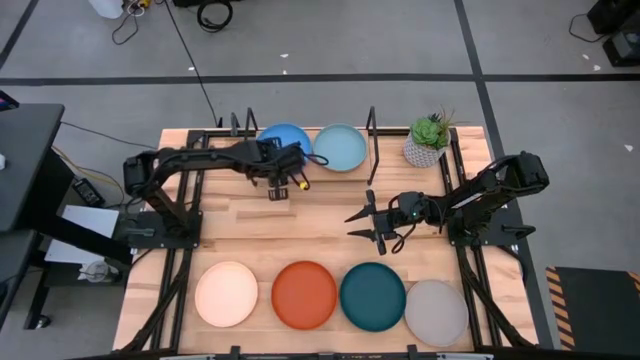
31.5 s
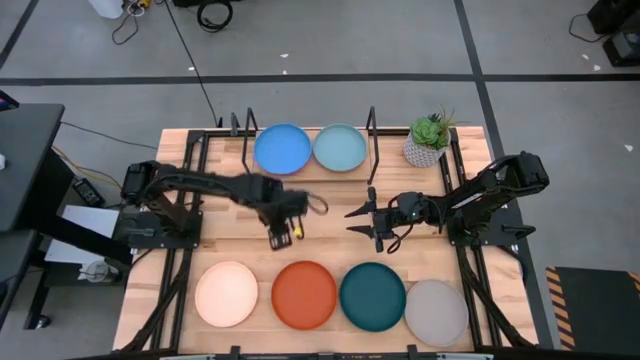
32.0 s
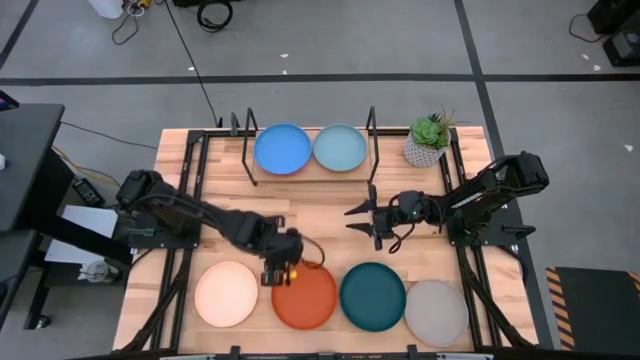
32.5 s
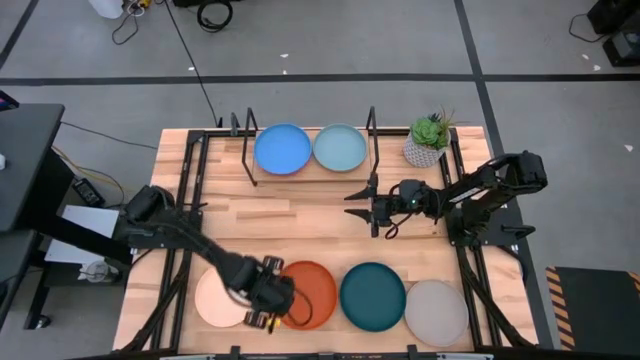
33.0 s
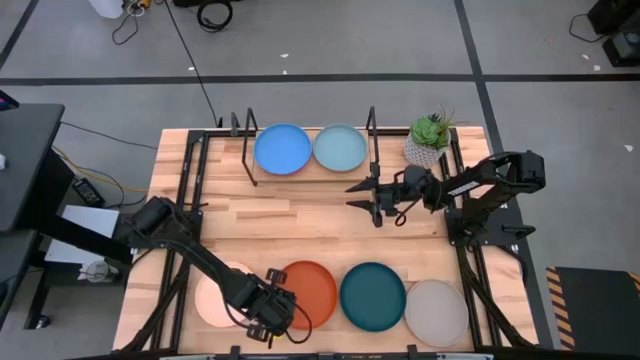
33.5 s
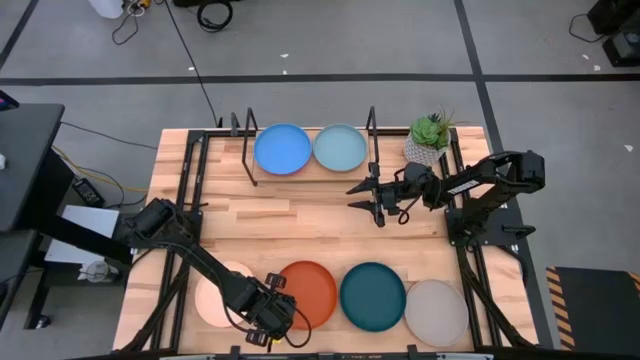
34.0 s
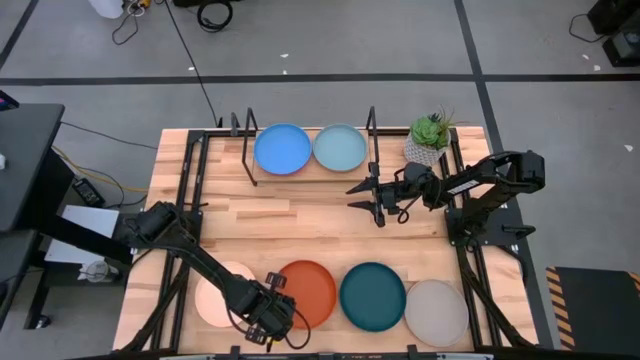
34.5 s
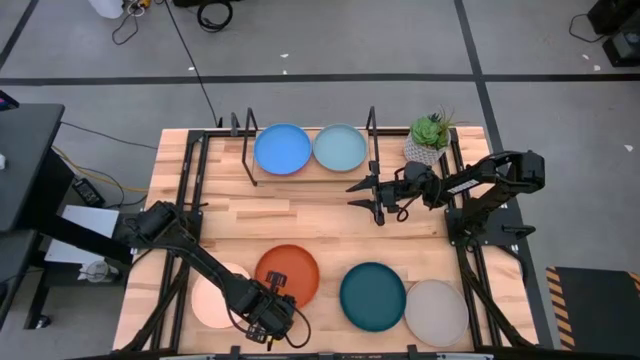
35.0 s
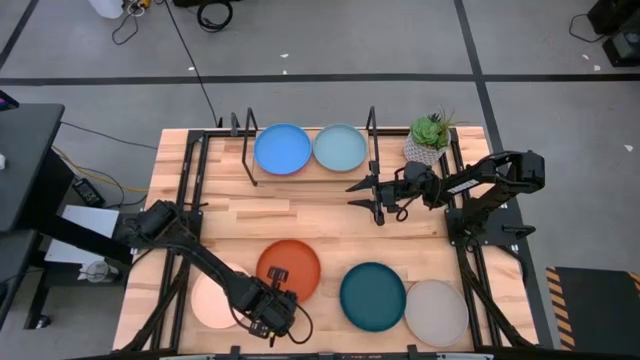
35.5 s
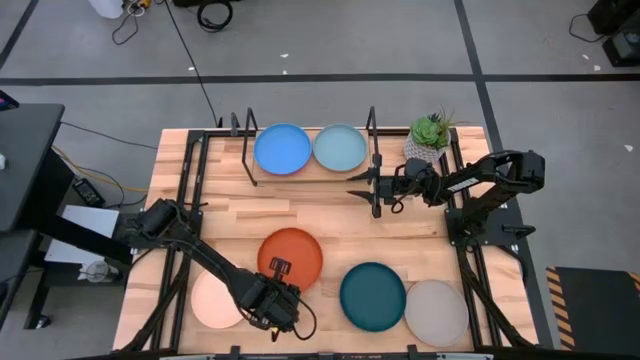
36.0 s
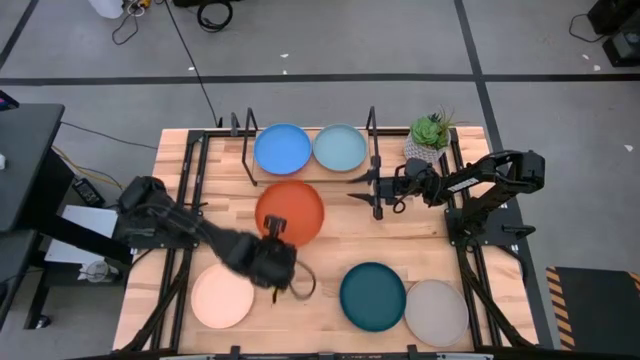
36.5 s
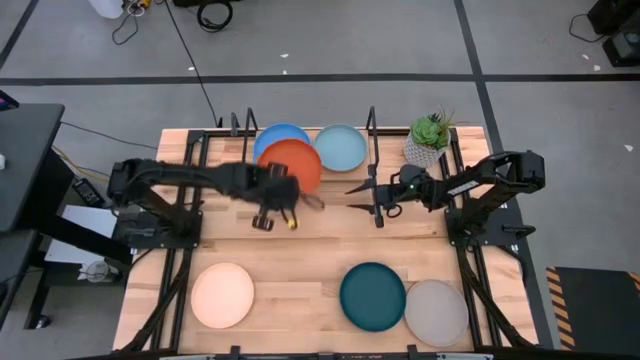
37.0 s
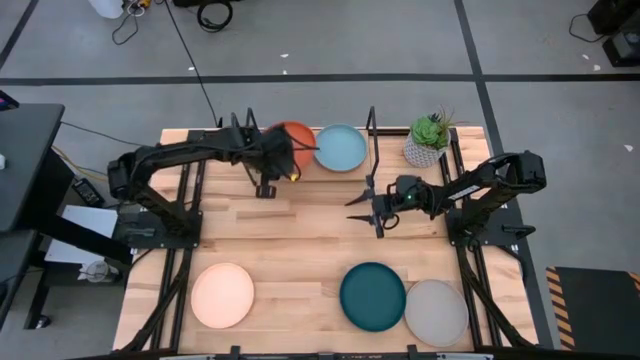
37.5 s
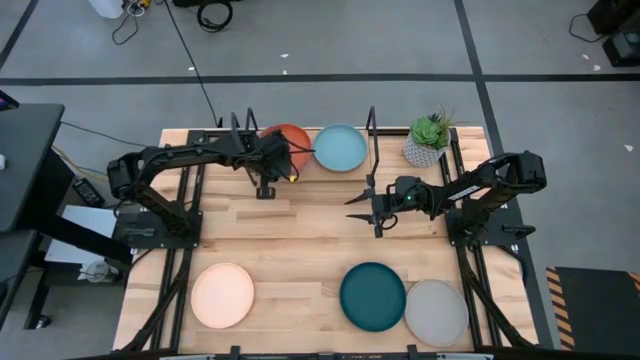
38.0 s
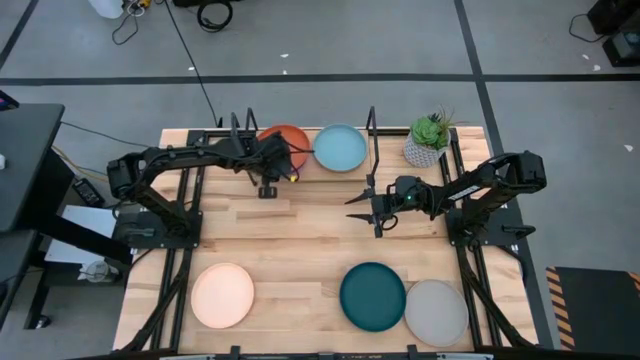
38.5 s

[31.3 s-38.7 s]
Task: Place and stack plates onto a shelf
Stack the orange plate on the top of blue plate on the shelf

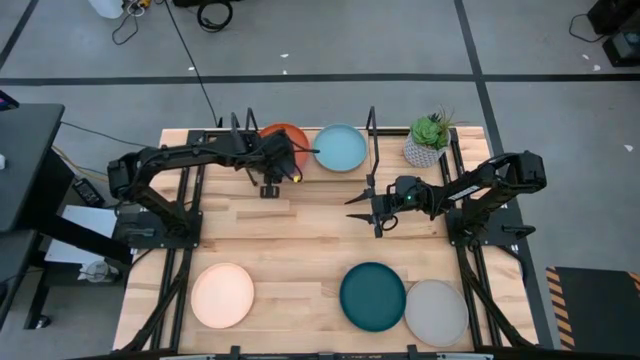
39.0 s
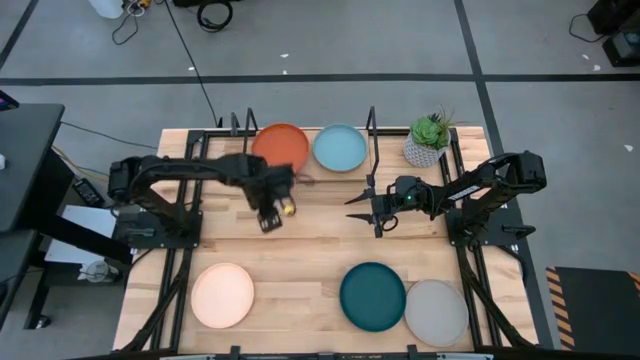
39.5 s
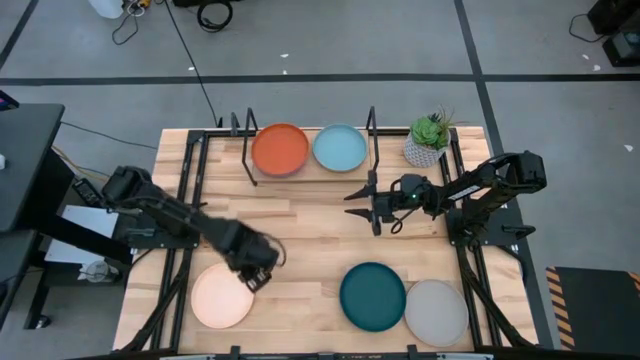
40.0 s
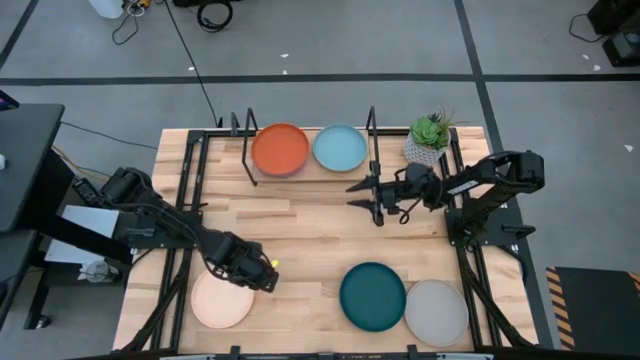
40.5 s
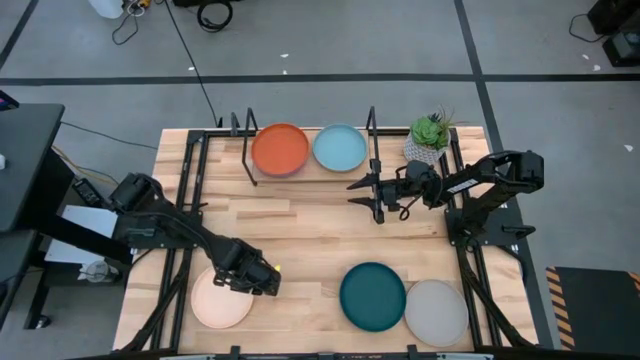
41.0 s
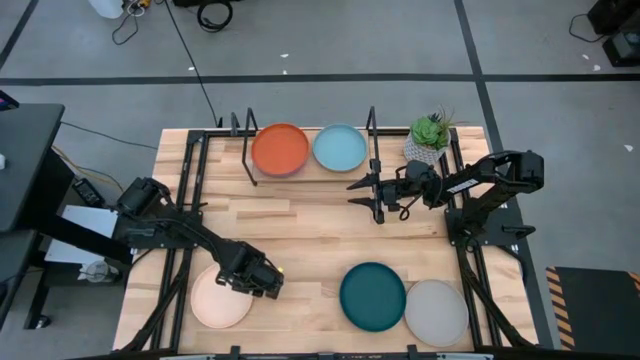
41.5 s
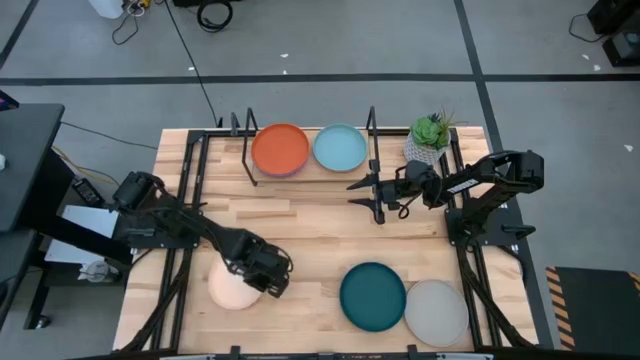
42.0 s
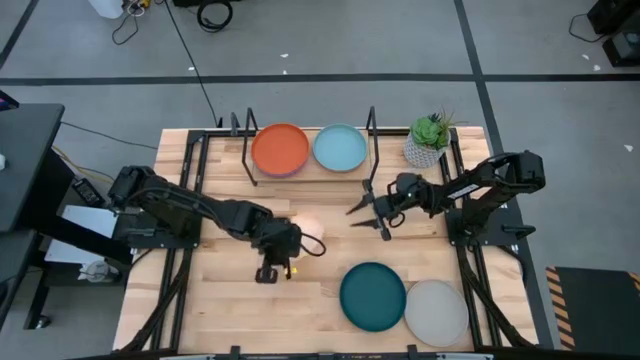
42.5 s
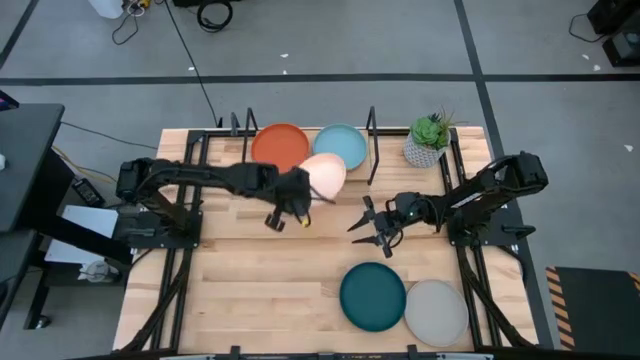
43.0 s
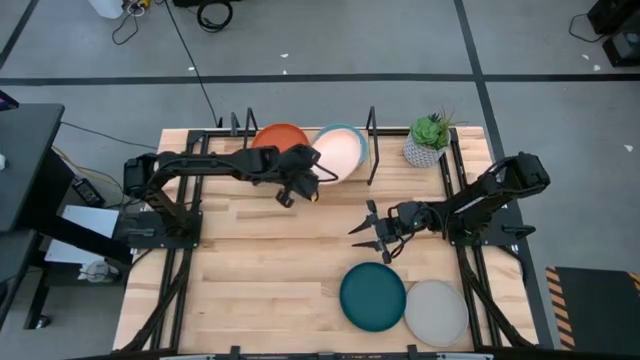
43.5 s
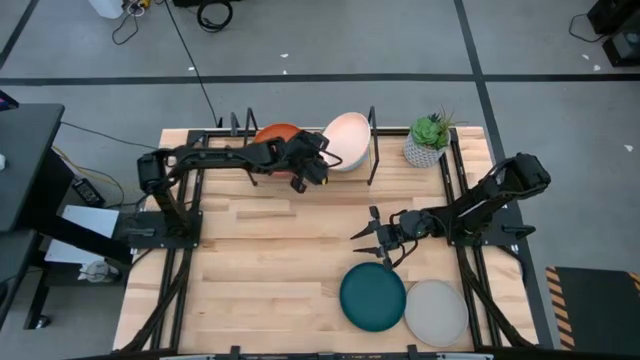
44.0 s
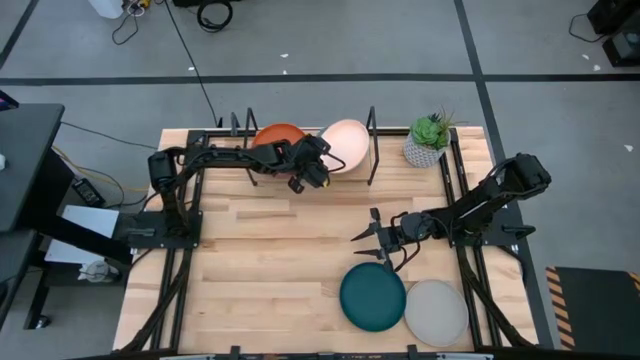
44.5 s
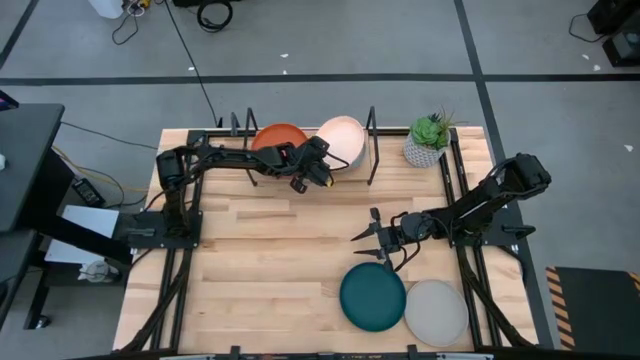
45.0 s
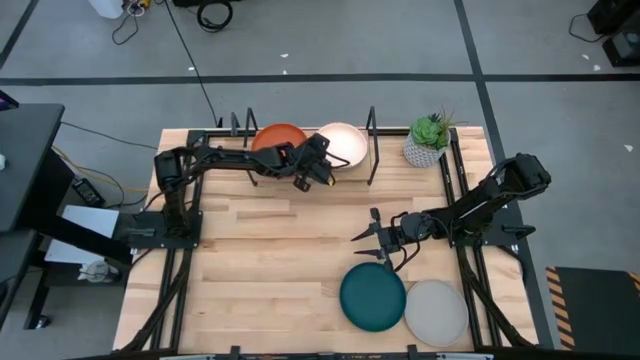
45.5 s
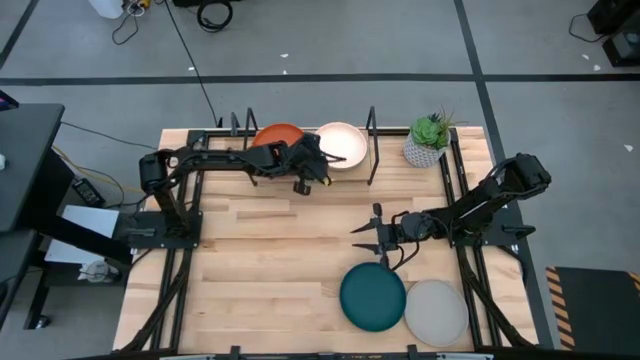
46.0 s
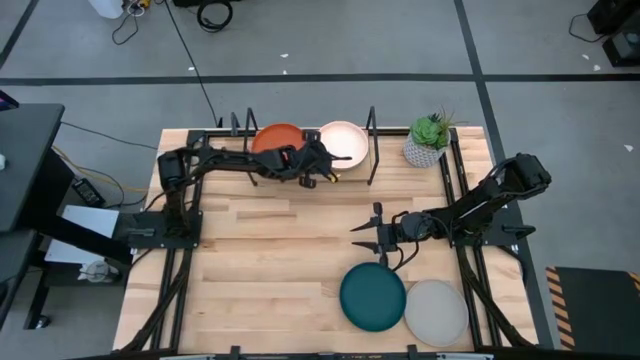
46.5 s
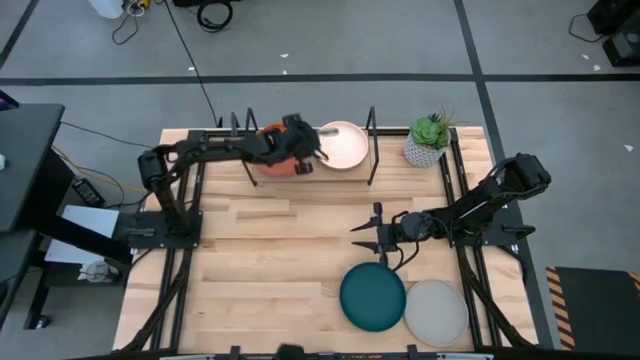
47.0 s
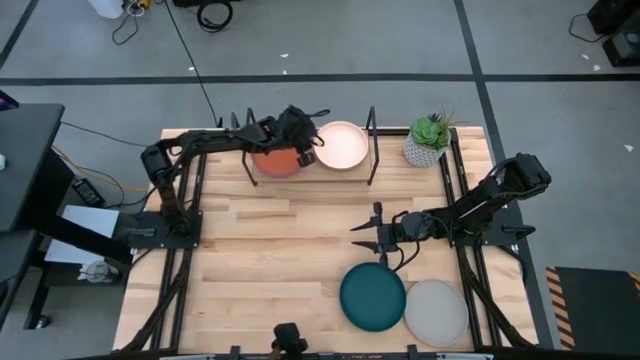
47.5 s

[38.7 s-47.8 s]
Stack the white plate on the top of light blue plate on the shelf

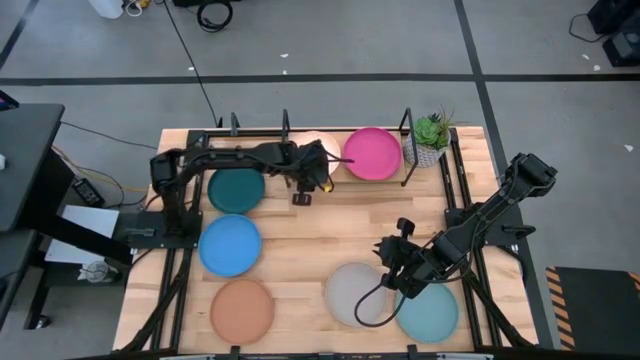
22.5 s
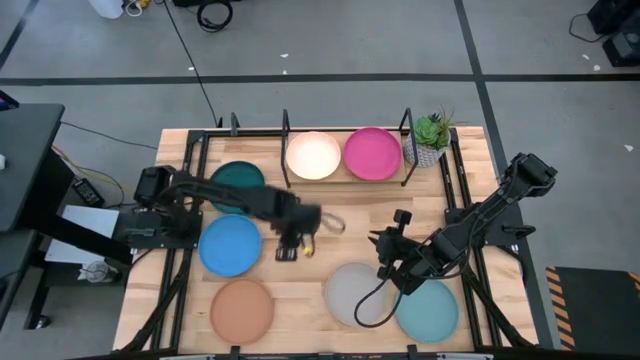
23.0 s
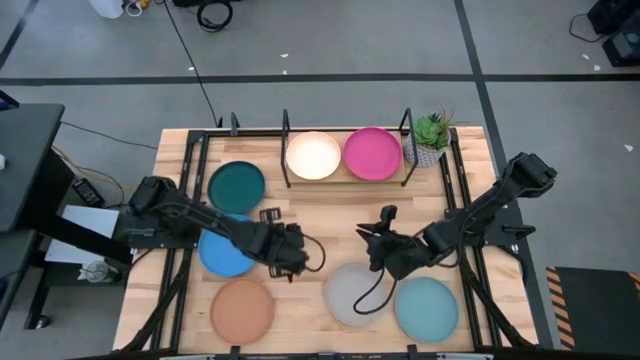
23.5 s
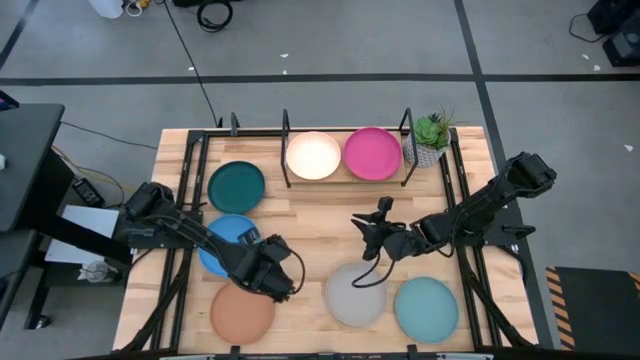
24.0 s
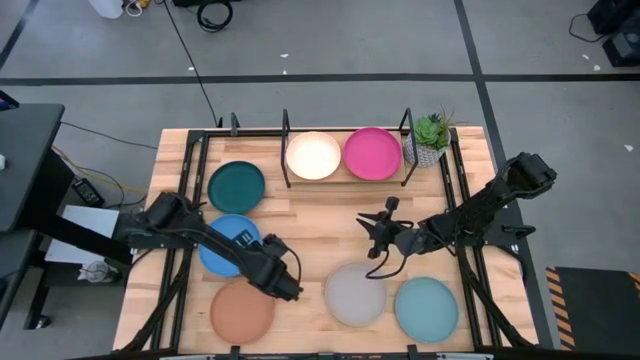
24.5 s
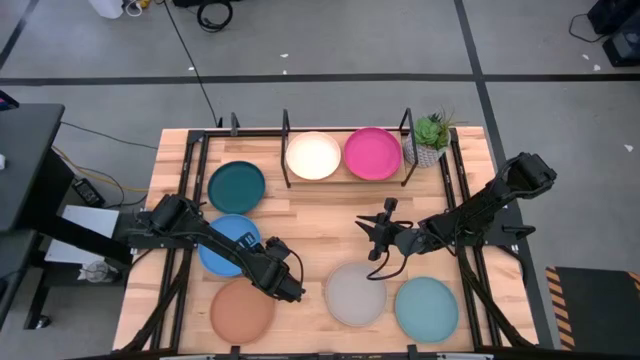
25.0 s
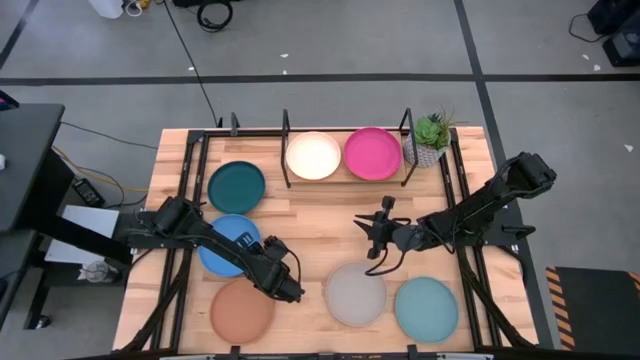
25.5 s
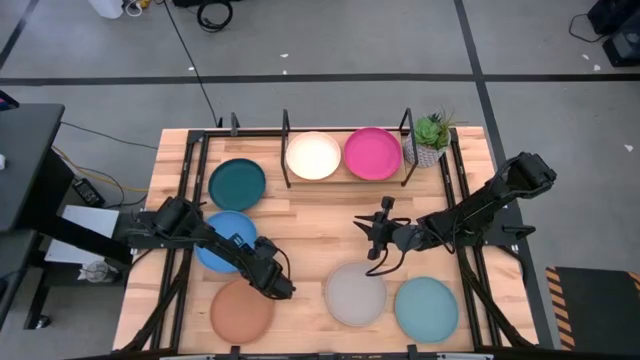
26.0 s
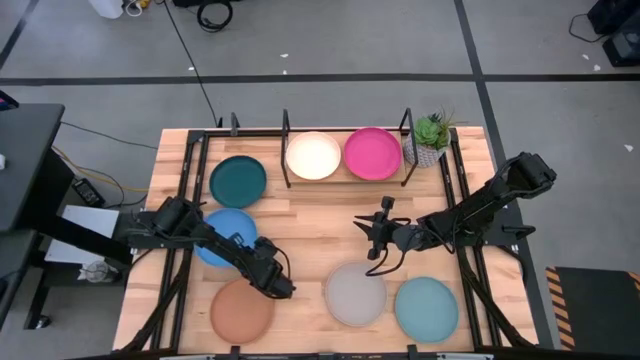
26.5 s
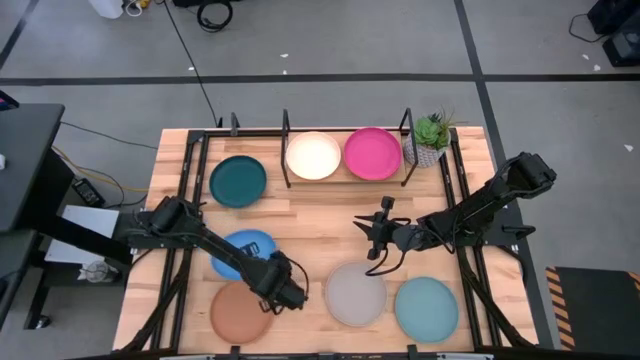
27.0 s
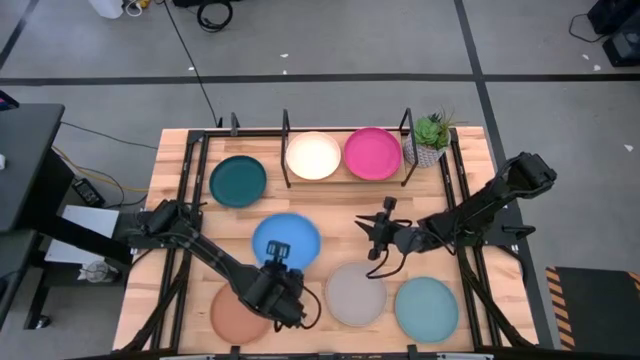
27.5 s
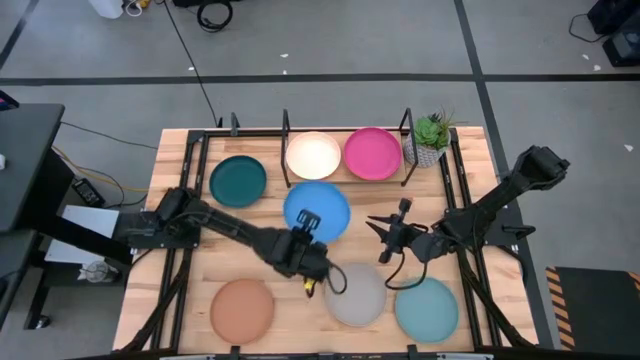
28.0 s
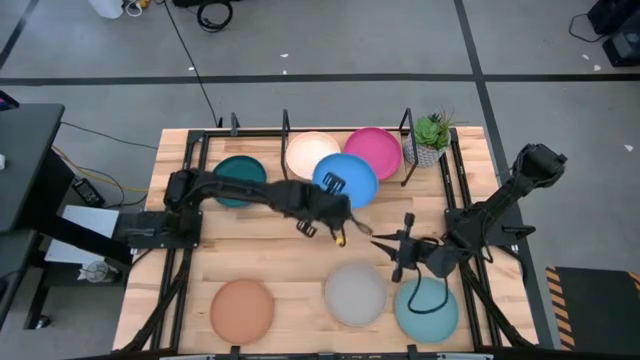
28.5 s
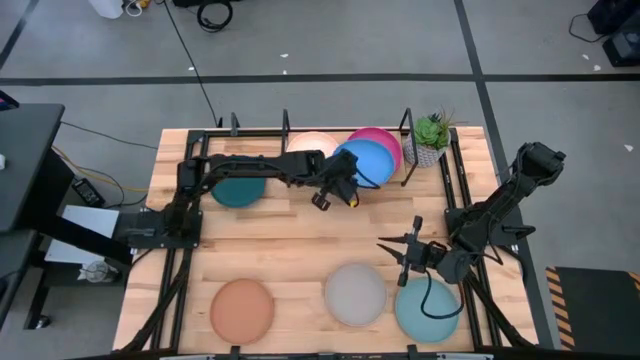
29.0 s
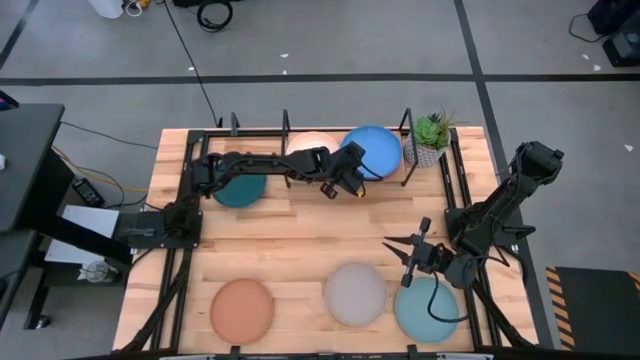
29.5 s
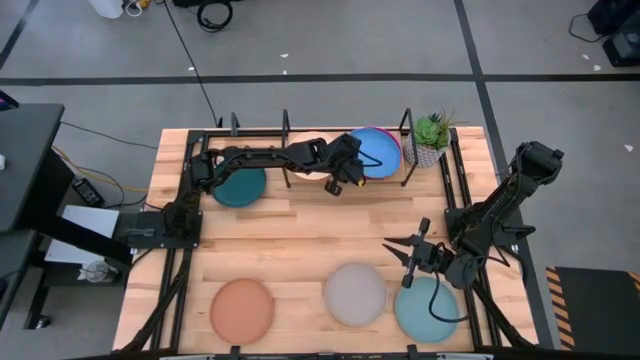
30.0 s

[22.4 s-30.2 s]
Task: Place and stack plates onto a shelf
Stack the blue plate on the pink plate on the shelf
